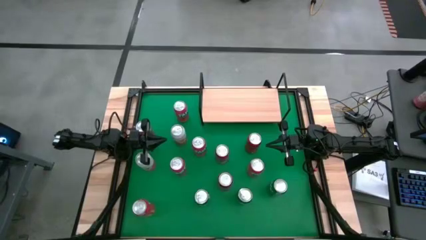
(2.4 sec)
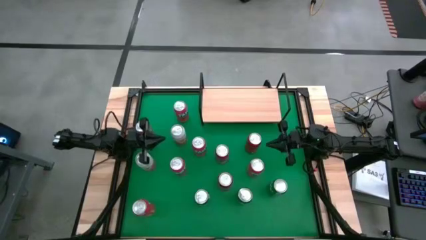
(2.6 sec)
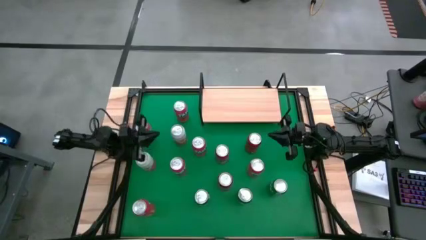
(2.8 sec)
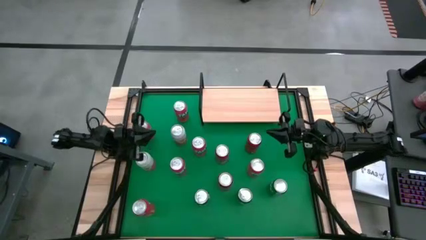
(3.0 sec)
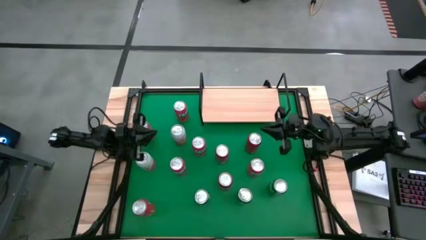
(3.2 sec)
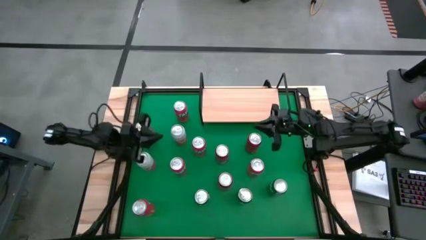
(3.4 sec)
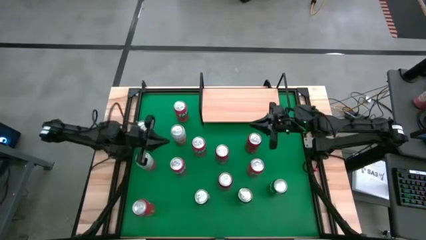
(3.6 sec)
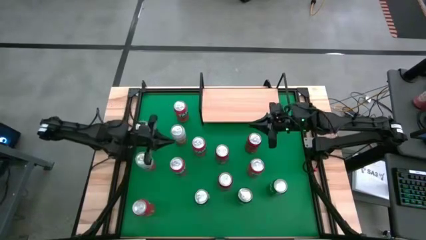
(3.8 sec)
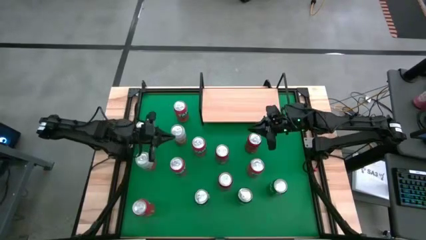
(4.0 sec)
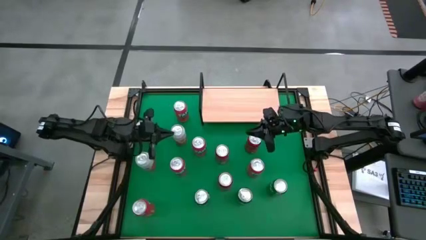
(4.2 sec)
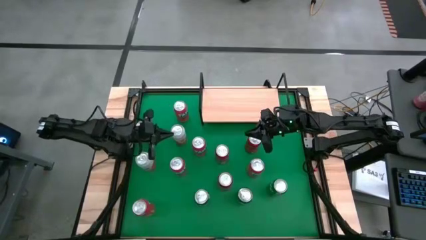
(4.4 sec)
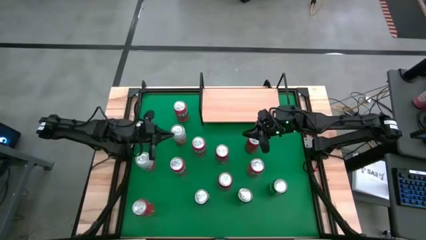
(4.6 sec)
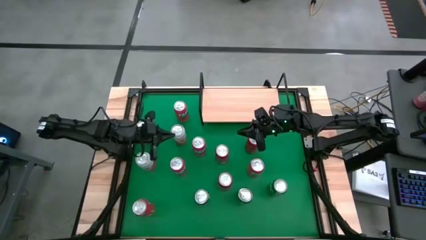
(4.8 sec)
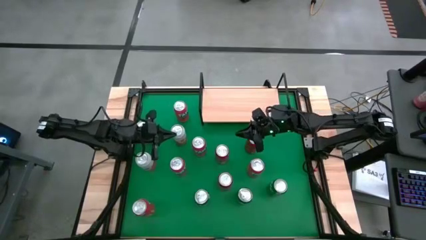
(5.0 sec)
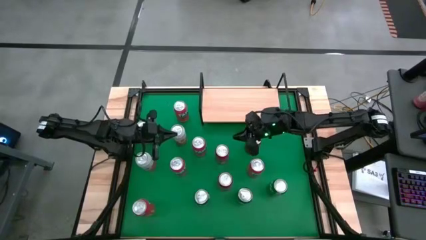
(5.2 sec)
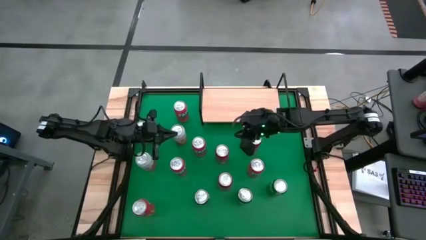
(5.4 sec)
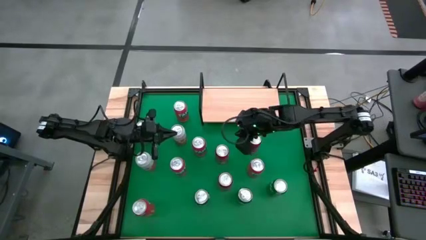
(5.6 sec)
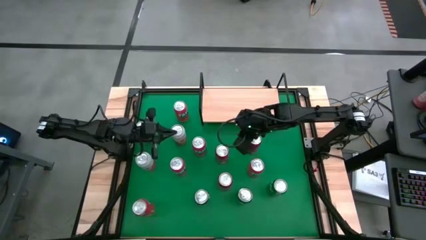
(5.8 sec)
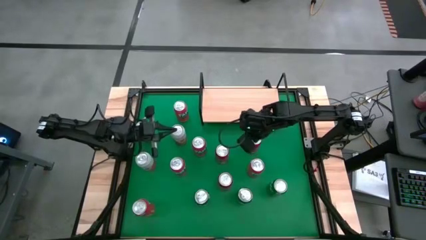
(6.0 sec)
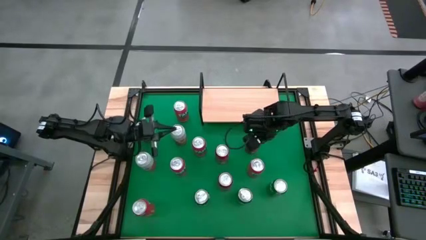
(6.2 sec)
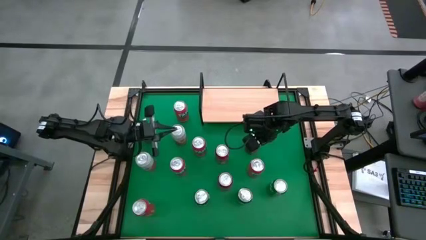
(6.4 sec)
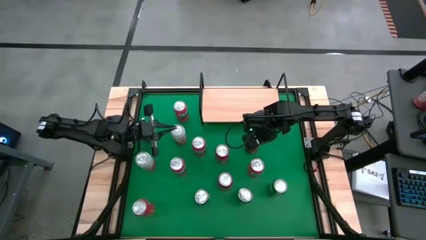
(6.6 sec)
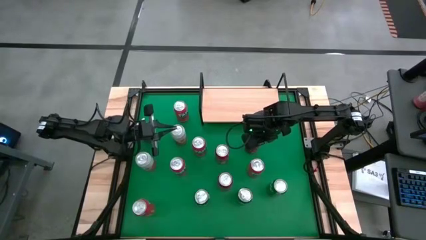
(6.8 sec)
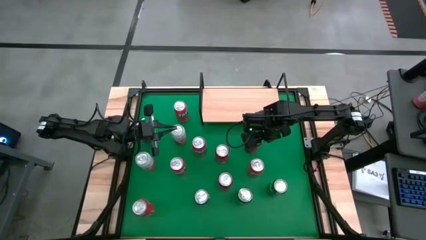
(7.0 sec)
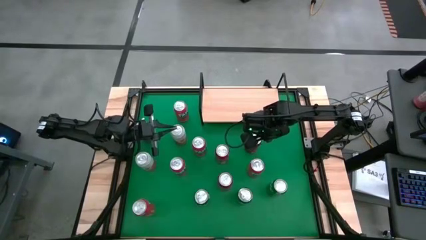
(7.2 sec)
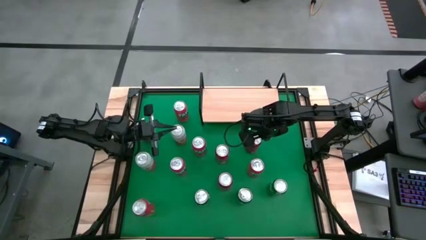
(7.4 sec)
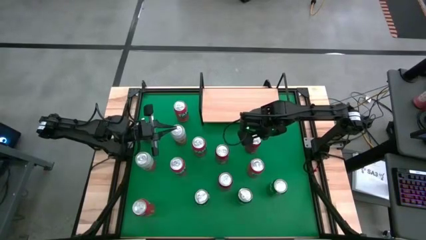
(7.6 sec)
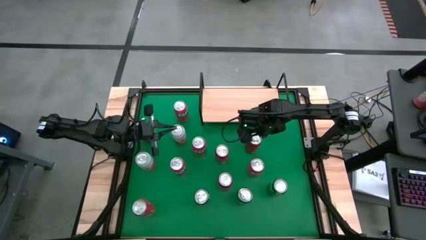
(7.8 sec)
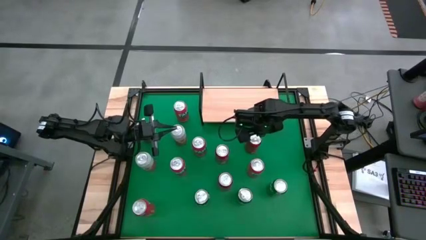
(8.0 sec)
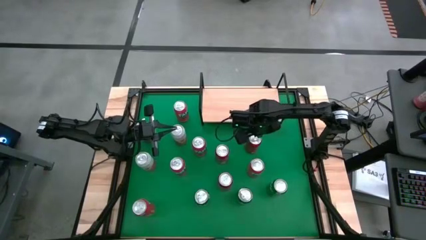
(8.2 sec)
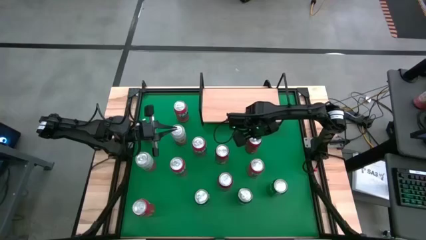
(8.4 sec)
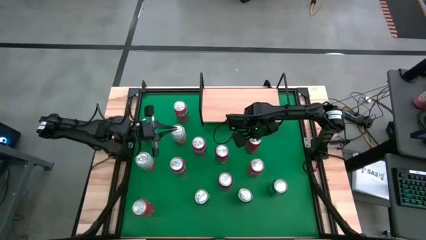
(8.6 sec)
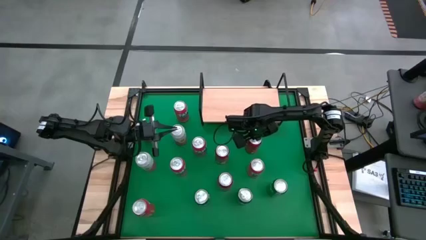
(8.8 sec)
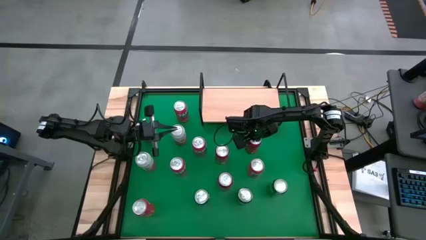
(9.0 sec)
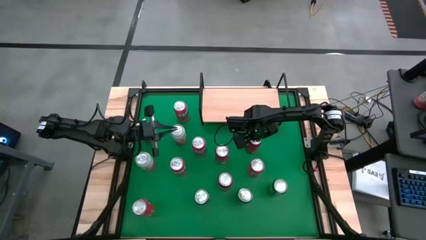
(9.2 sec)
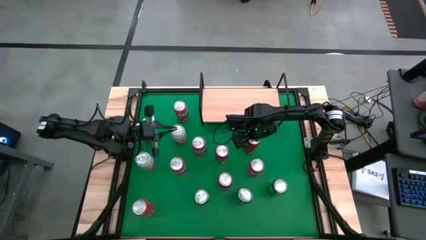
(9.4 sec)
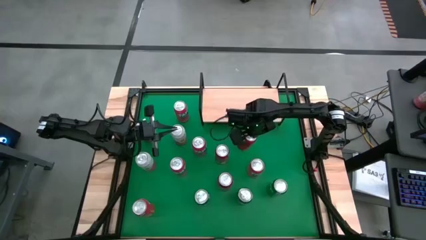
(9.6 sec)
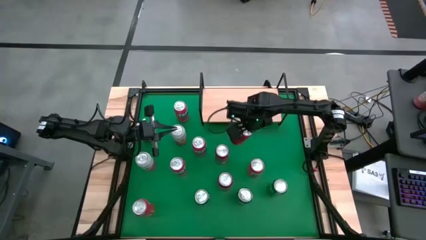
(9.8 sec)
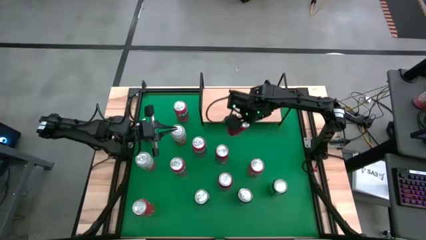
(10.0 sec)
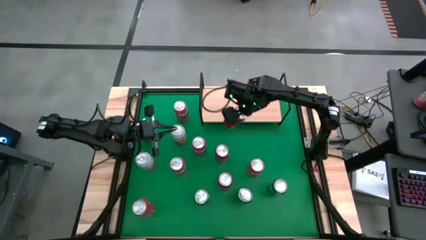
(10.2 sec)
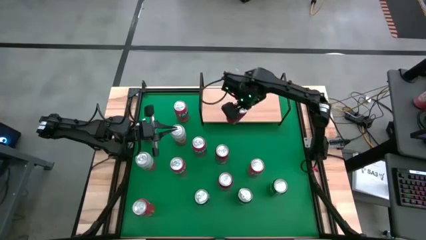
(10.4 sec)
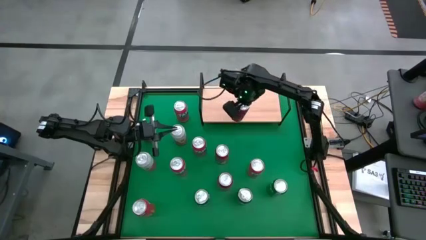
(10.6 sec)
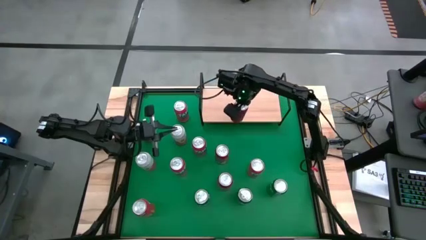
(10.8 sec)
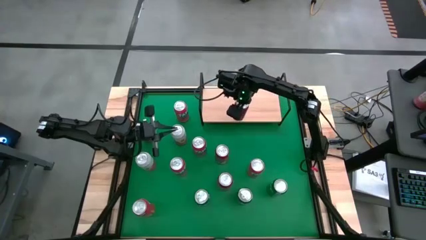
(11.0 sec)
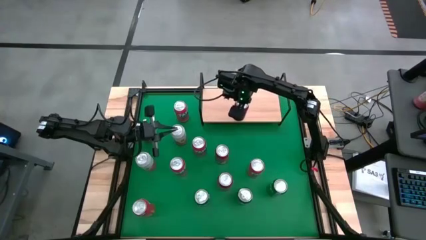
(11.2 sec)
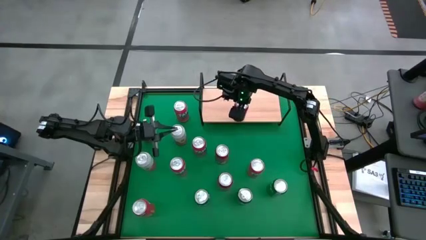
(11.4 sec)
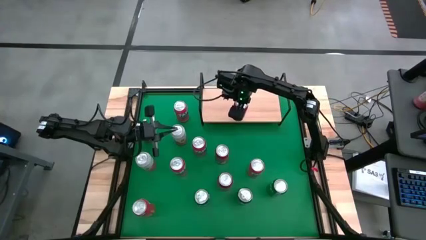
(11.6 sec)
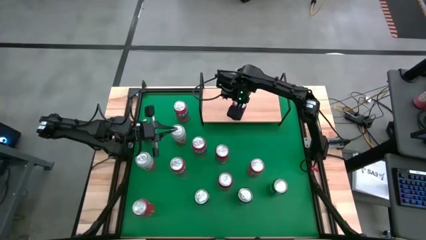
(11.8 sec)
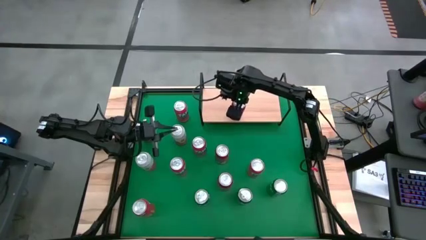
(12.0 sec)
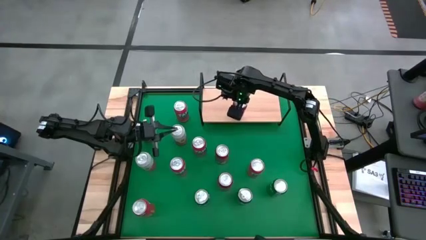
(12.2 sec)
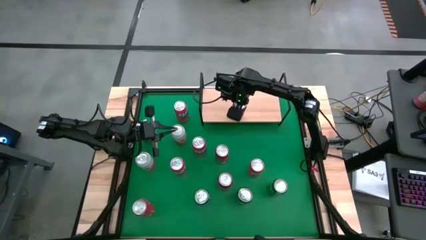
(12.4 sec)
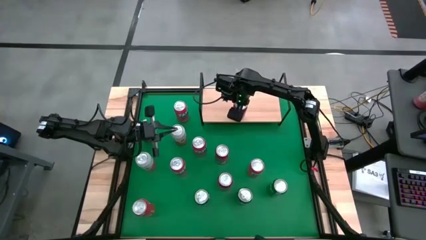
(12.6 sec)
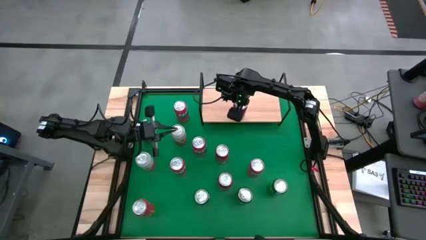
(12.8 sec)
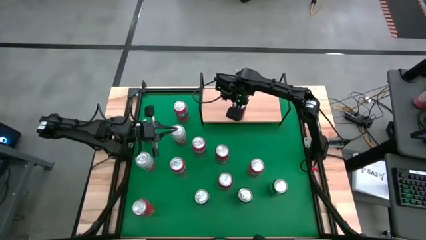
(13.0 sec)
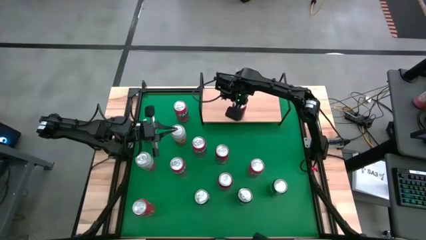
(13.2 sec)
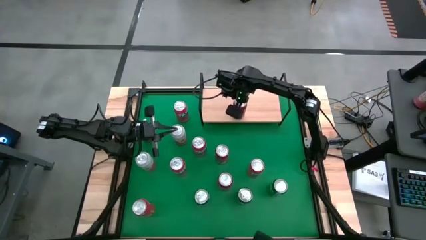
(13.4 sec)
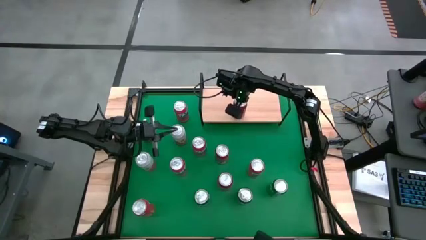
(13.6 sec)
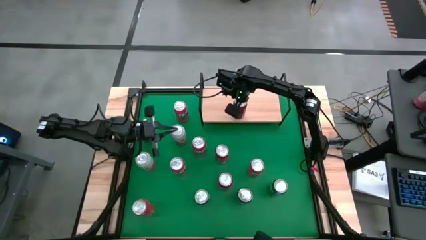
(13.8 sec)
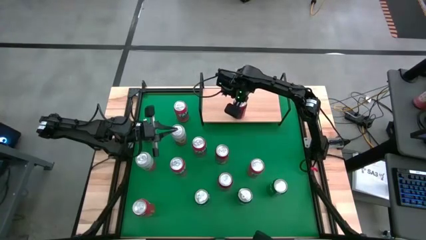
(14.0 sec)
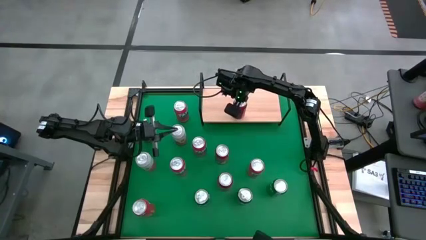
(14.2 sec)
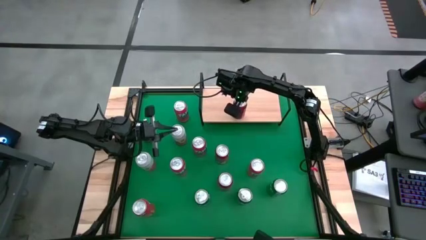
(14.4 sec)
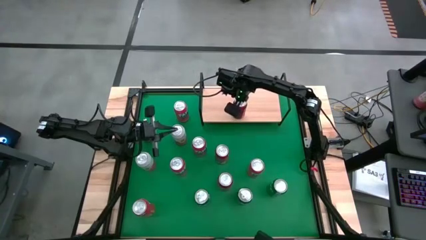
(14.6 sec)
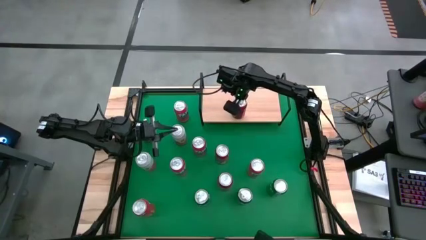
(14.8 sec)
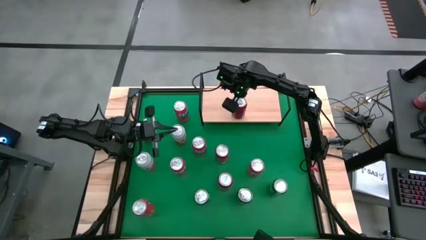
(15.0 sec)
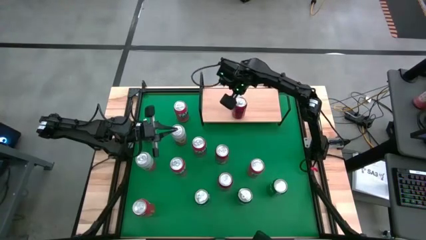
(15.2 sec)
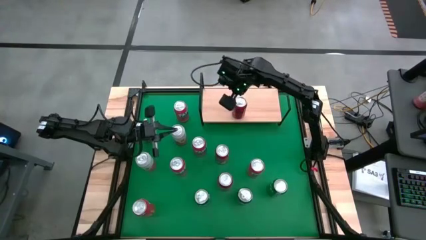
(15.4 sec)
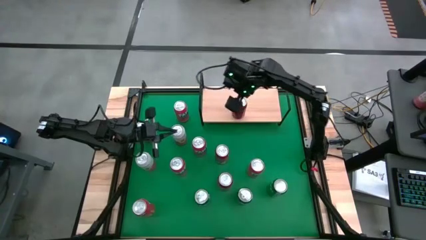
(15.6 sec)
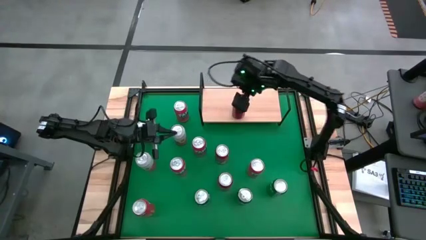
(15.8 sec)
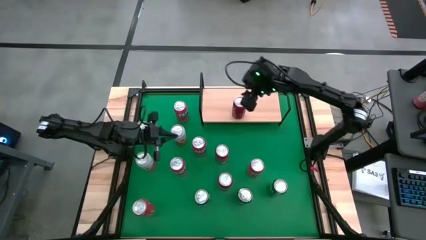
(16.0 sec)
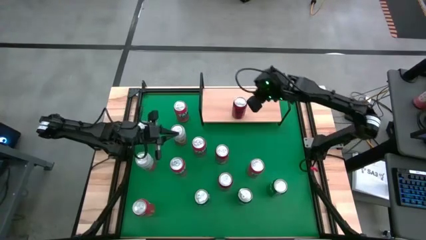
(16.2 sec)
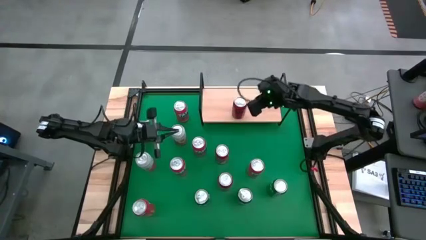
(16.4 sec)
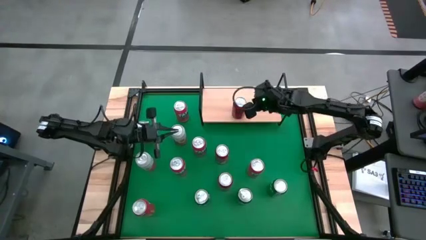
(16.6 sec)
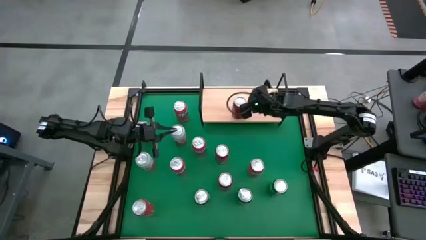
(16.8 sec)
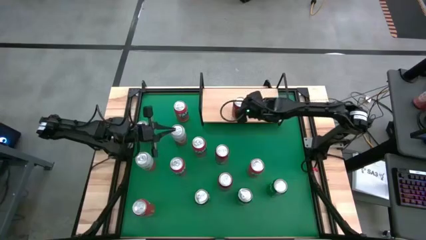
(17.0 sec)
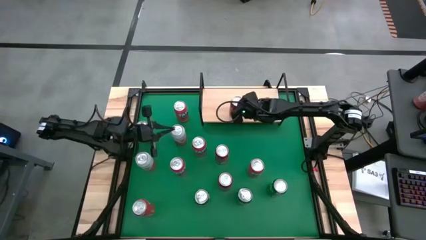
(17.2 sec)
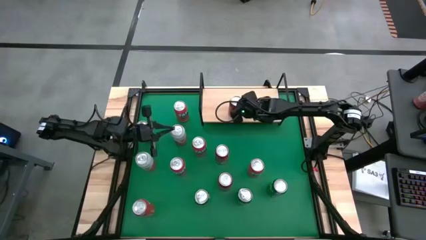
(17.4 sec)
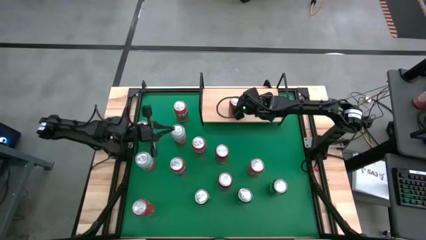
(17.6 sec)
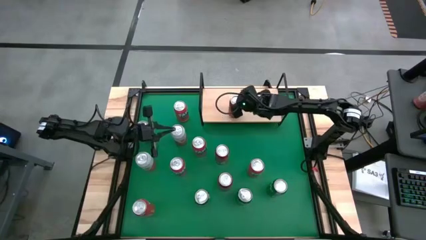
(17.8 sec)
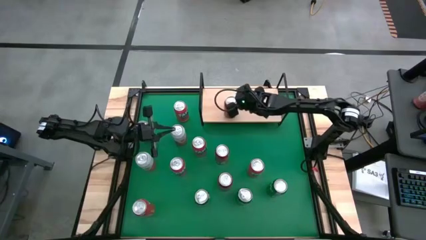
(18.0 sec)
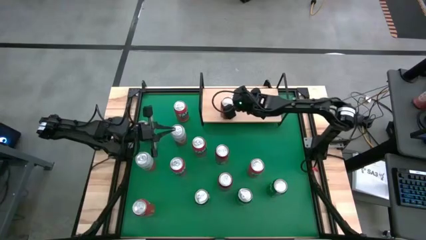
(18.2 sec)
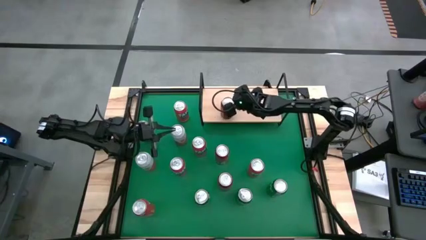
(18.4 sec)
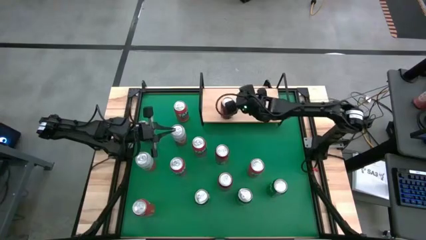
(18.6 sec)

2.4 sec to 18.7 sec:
Task: Place canned beverage on shelf
Put the red-black soda can on the shelf
